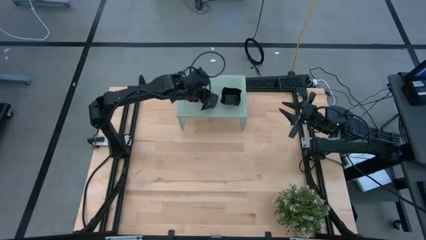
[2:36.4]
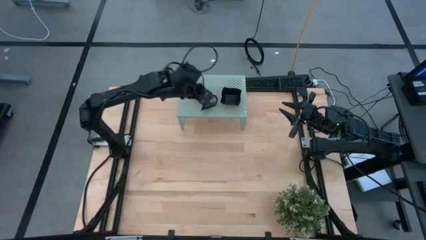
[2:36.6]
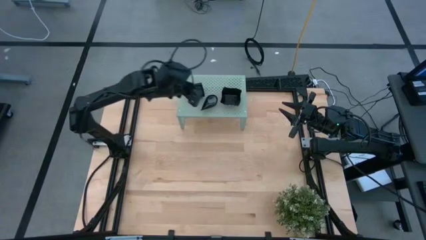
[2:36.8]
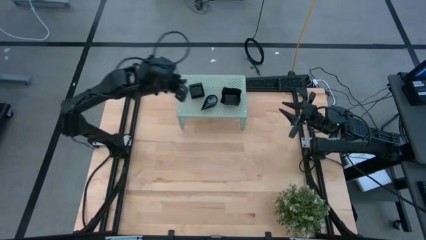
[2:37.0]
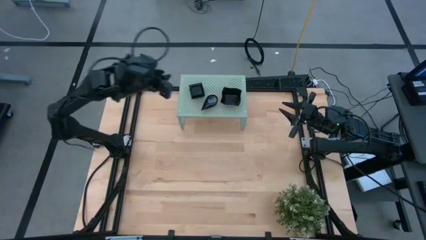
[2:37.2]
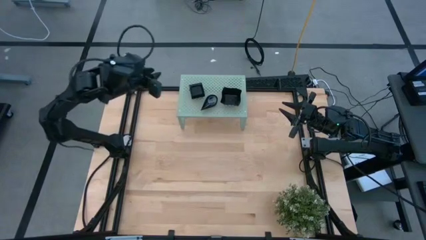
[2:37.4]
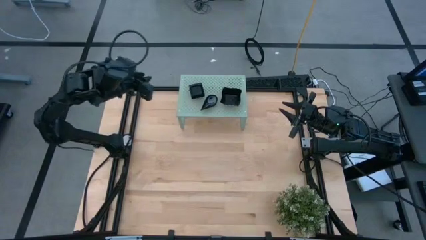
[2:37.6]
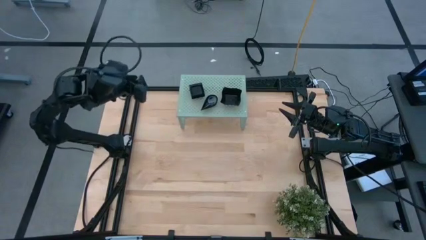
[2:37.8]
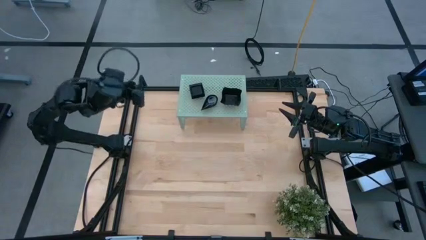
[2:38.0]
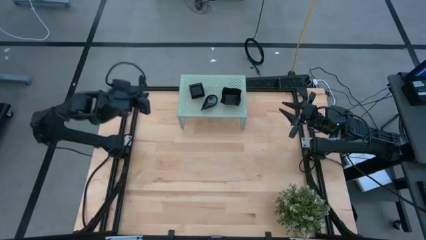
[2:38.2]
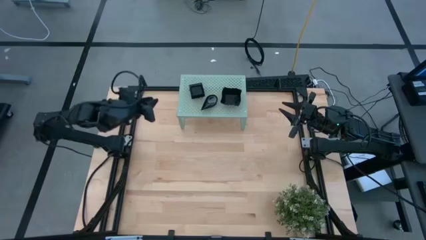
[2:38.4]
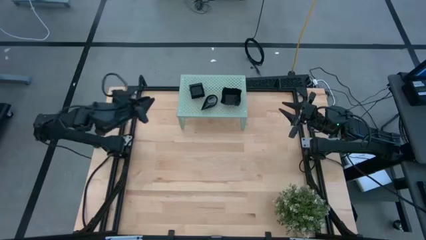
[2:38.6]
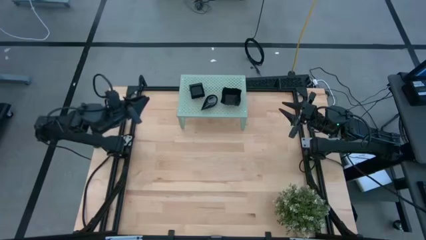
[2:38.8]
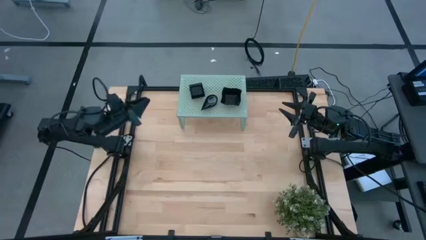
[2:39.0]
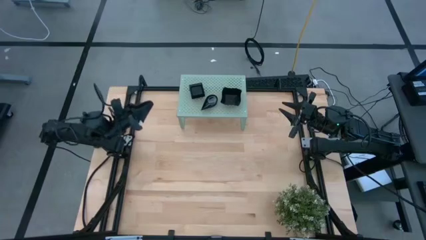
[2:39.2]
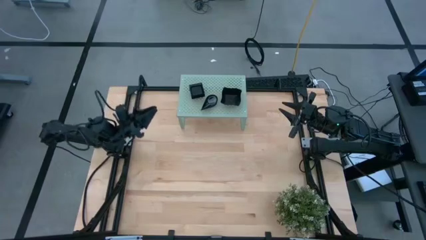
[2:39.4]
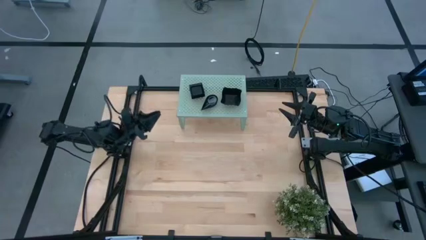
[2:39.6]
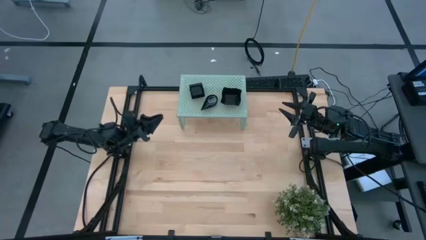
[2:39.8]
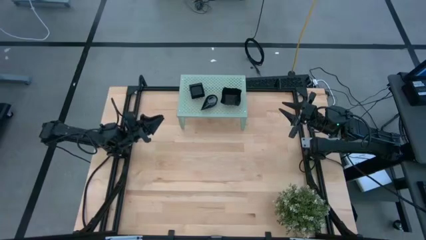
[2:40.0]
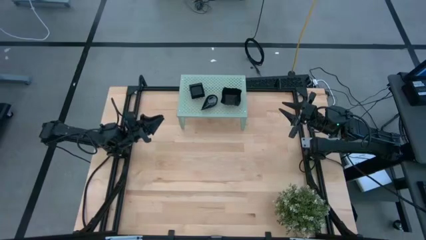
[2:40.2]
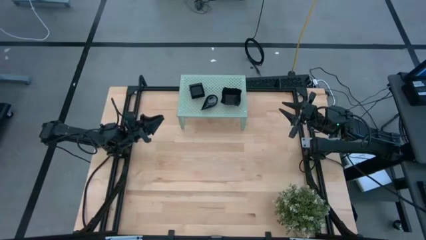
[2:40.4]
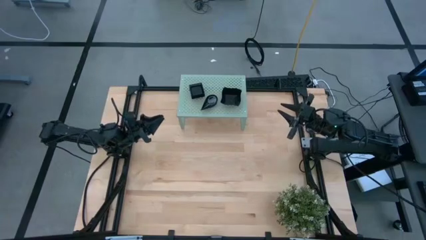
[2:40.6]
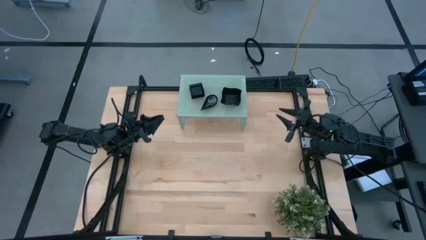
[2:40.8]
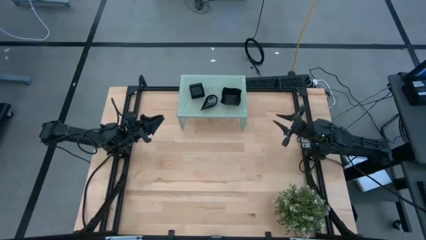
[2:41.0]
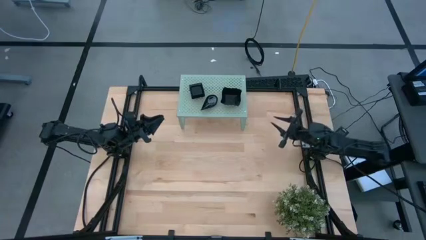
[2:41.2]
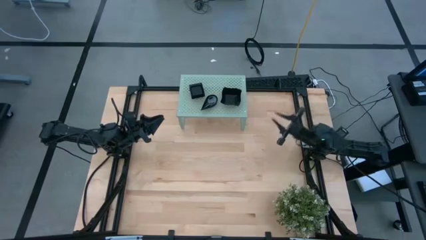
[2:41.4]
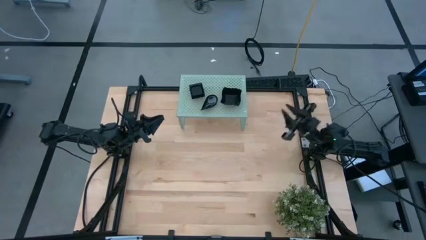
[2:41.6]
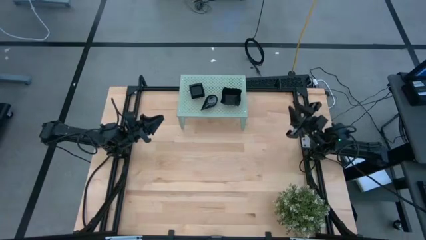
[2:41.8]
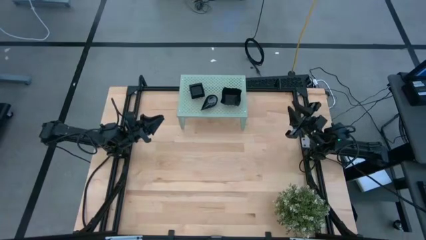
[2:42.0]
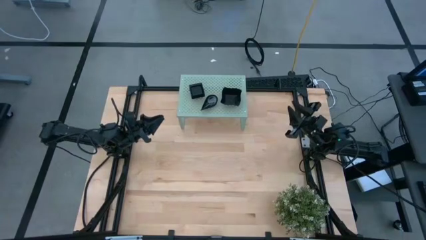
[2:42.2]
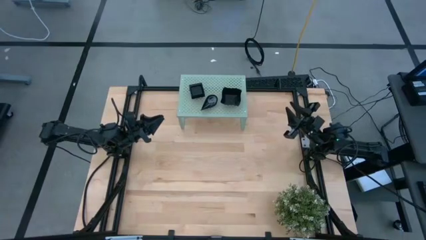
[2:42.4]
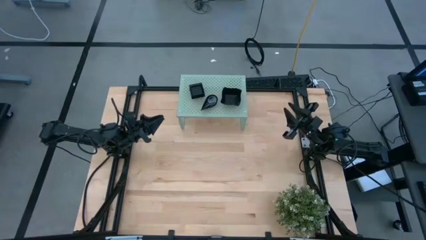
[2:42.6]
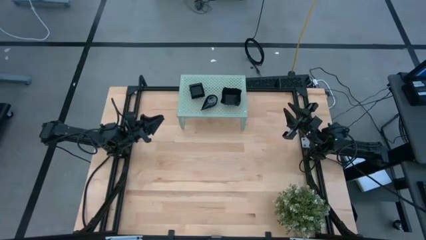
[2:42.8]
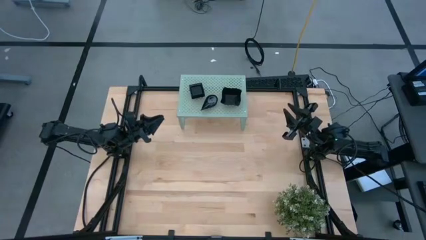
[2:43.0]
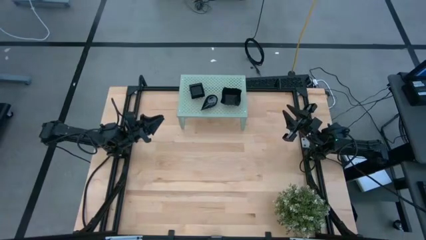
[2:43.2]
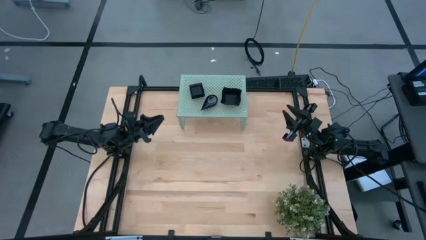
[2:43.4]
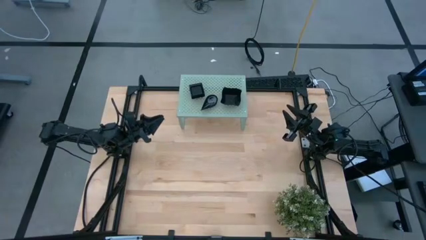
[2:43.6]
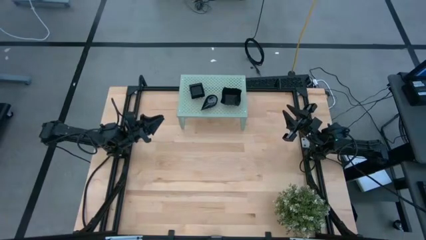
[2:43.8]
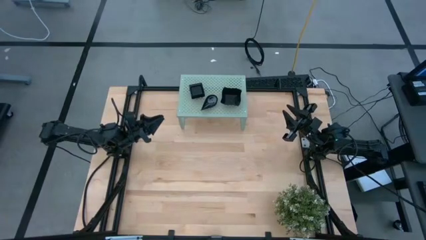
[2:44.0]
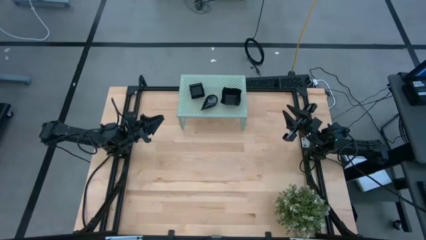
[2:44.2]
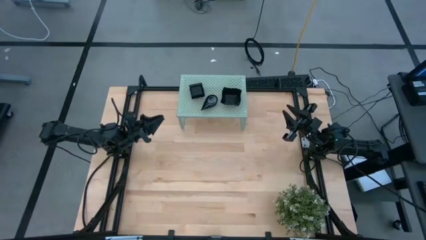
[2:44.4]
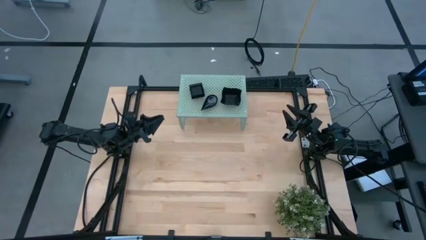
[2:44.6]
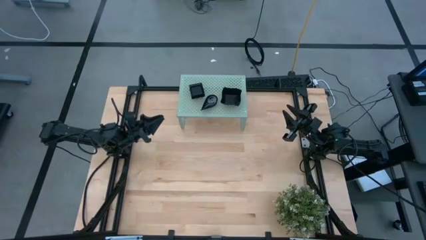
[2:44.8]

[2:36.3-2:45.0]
Task: Pick & Place Mini shaped plates
Return to Home Position

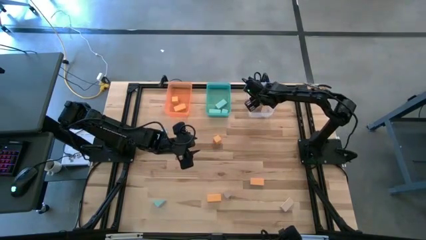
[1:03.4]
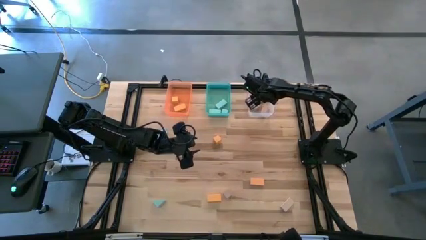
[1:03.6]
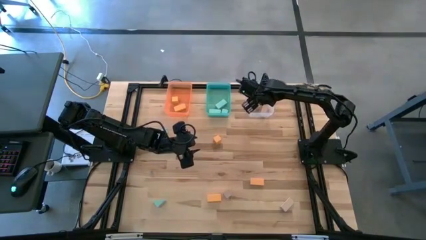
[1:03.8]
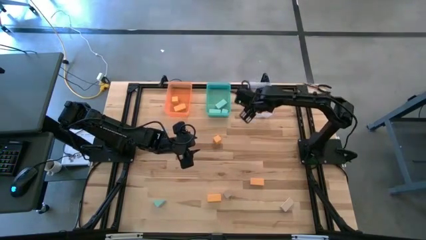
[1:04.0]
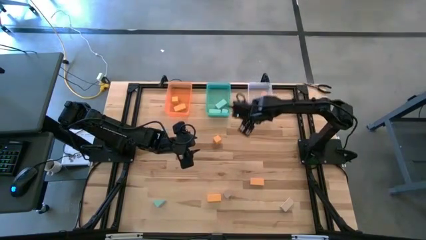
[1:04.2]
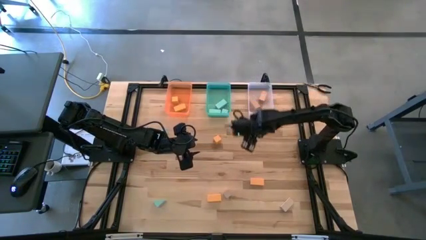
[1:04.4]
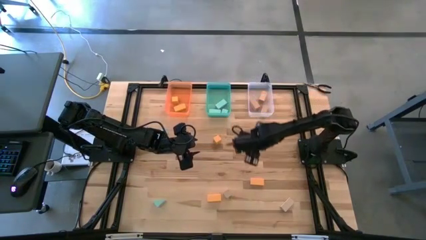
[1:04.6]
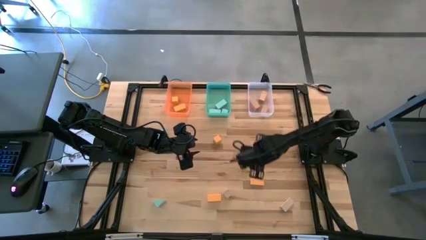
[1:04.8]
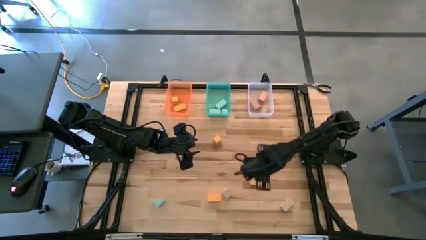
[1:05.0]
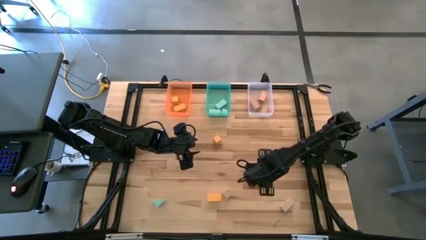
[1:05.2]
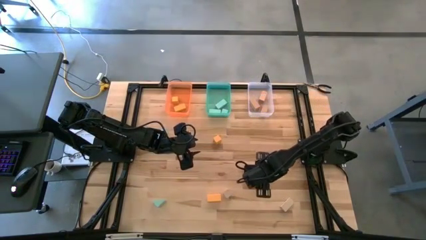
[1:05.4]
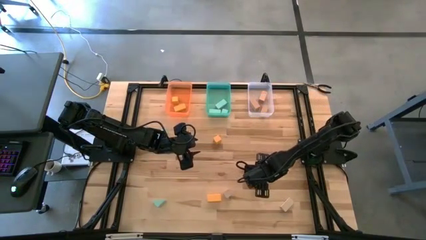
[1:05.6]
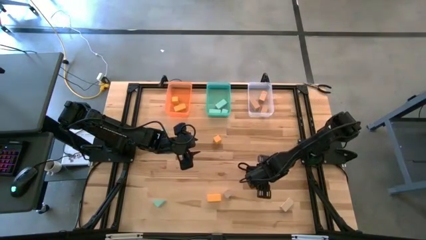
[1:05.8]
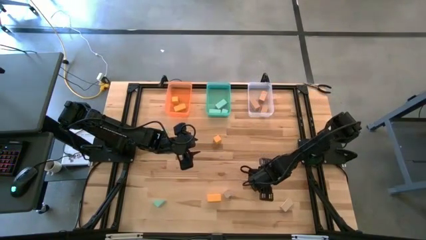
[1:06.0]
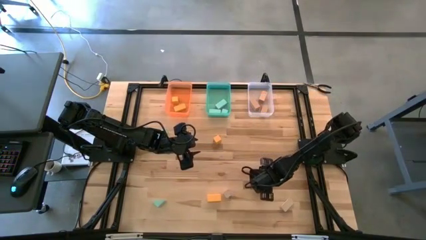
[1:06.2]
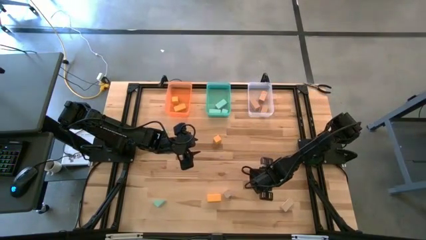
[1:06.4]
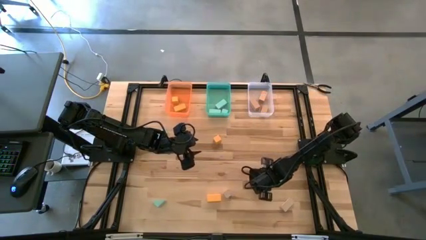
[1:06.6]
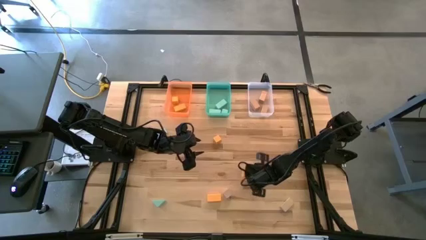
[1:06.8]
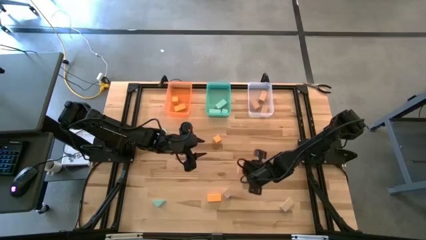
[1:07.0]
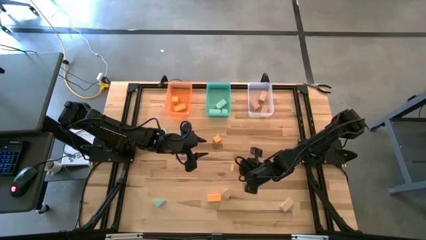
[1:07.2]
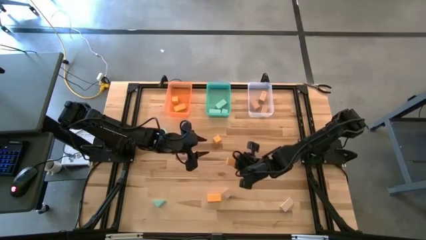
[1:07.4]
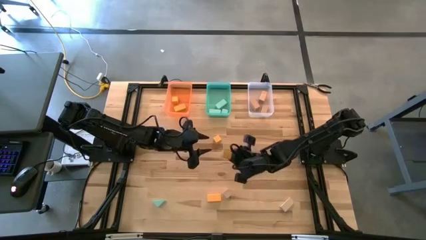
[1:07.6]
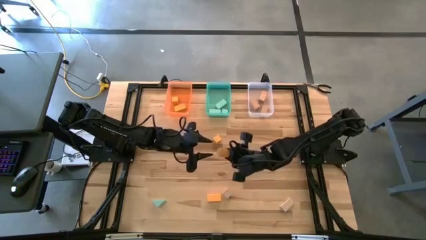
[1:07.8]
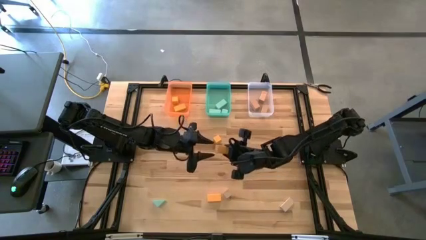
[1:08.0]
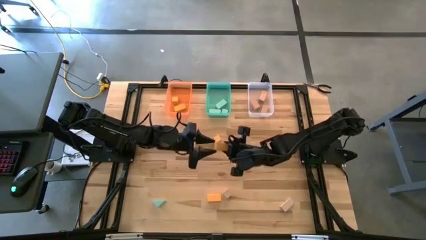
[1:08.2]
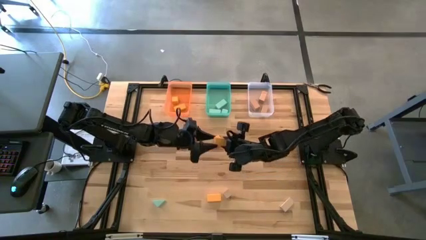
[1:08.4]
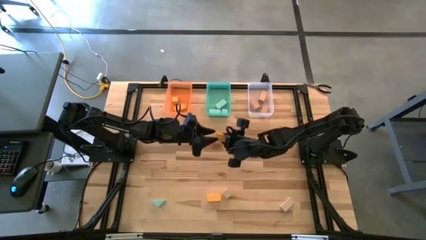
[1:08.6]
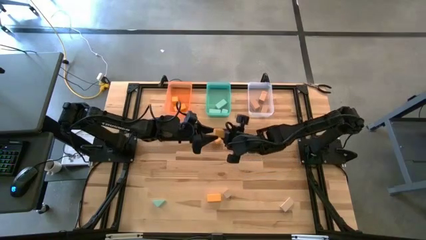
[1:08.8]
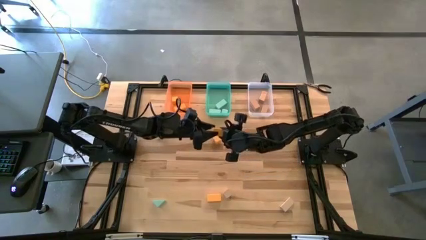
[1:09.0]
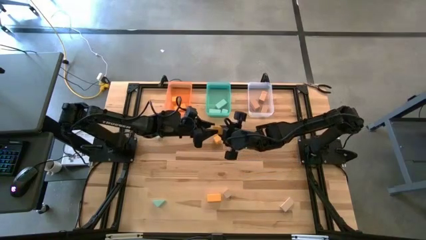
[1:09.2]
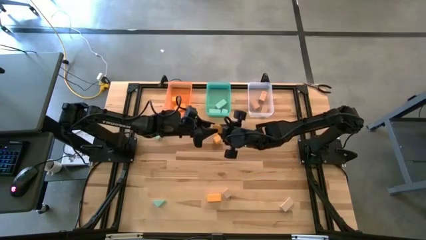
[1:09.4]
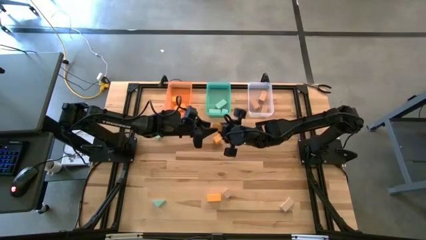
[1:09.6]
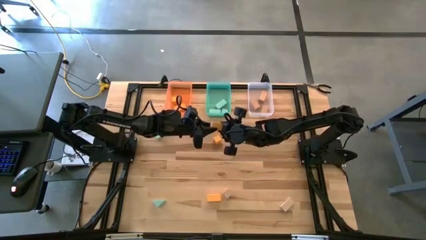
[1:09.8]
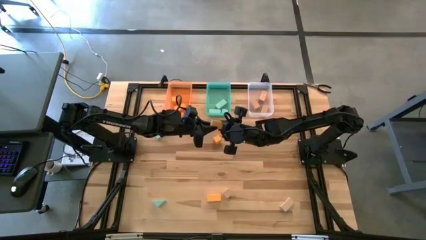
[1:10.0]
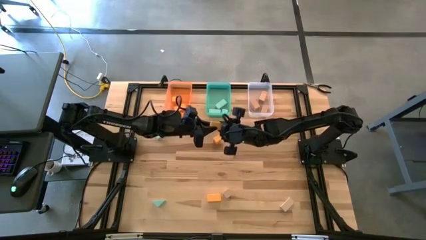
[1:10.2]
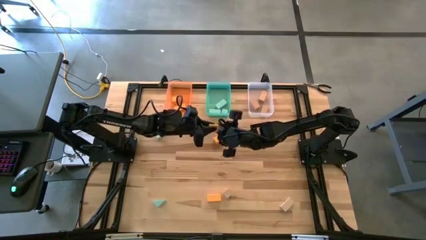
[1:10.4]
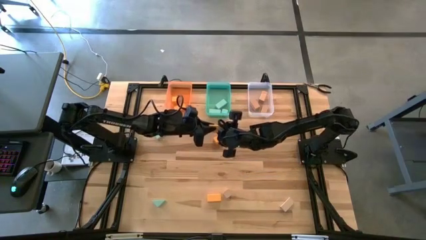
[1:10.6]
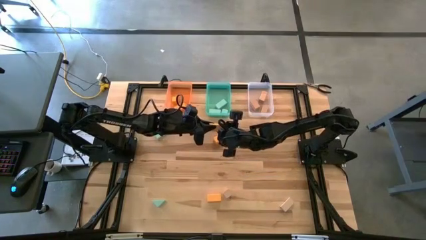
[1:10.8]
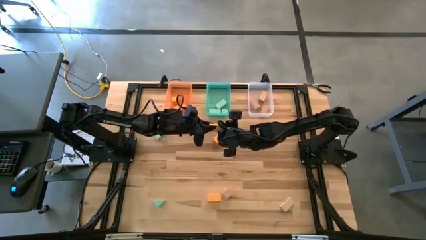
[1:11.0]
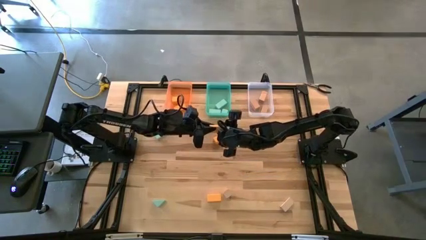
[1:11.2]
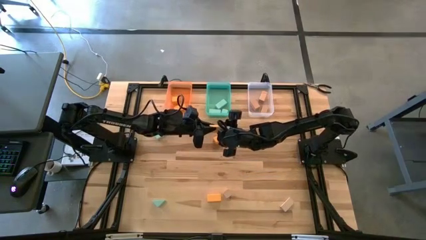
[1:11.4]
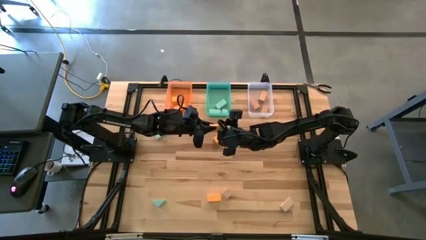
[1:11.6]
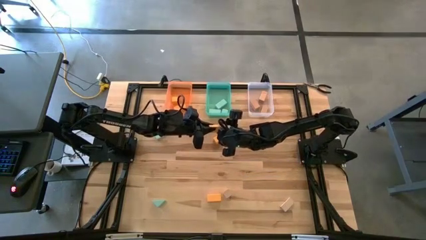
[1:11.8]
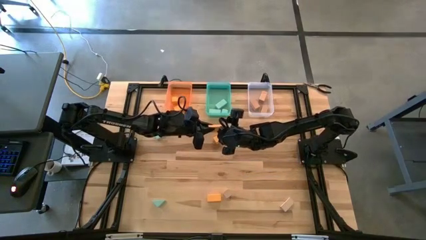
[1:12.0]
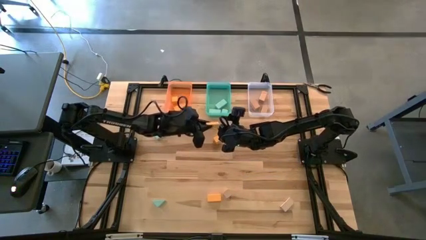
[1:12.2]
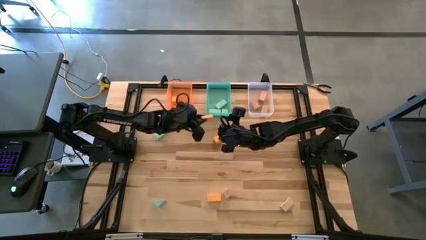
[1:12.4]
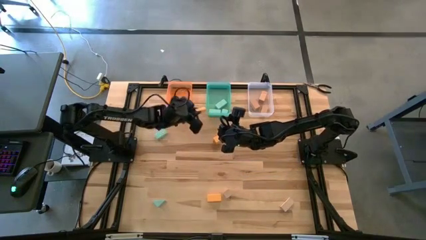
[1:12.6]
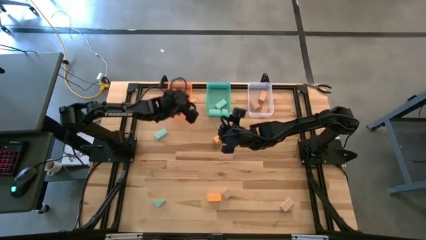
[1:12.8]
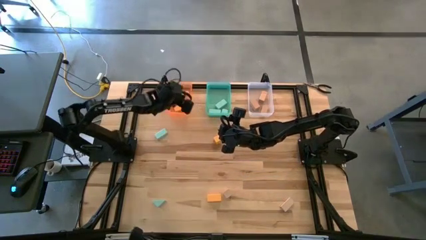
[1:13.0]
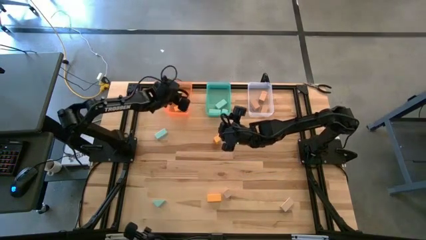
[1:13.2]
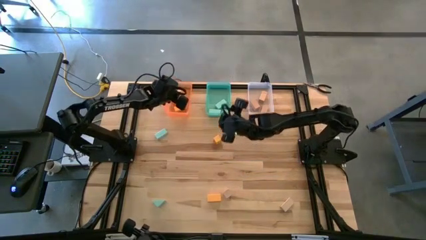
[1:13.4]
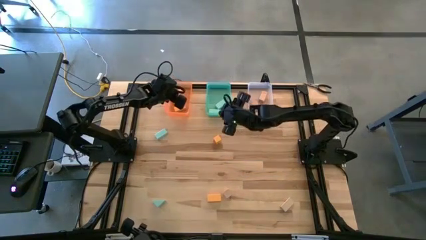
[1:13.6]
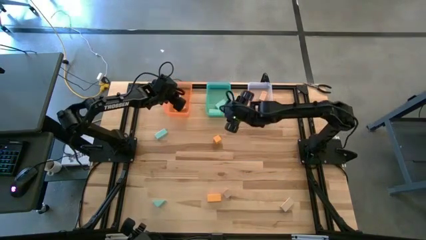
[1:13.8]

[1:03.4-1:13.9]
Task: Sort & place blocks by color
Put the orange block into the orange bin
